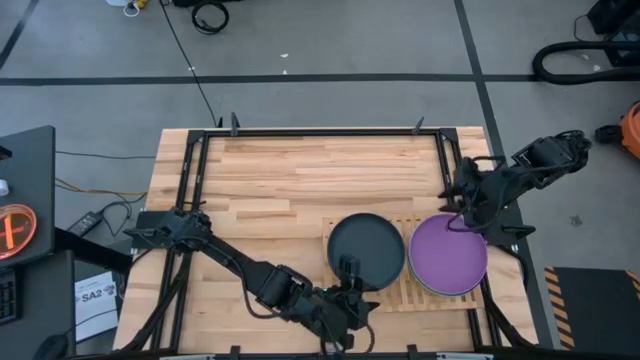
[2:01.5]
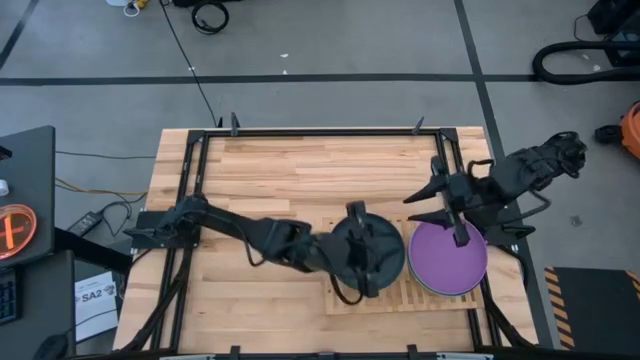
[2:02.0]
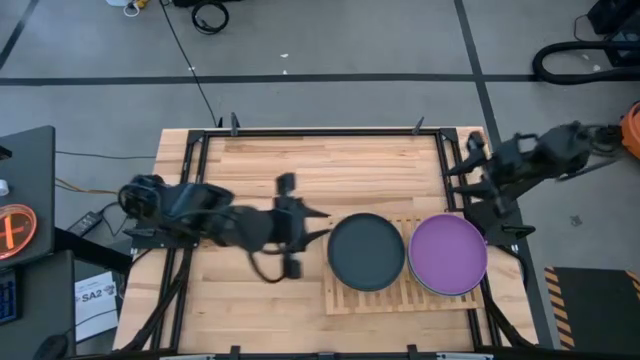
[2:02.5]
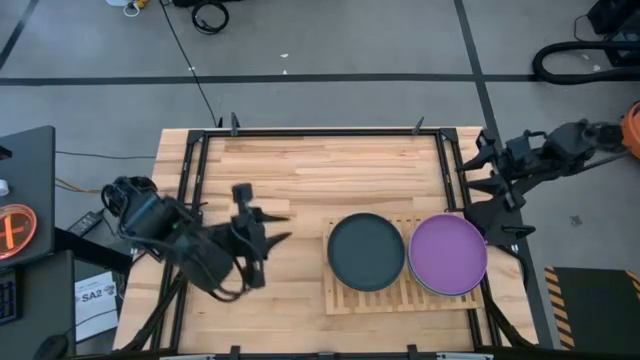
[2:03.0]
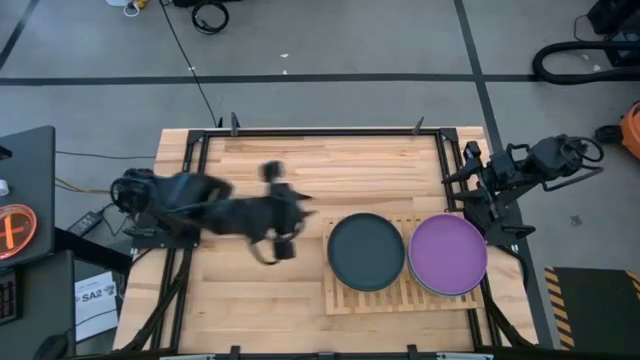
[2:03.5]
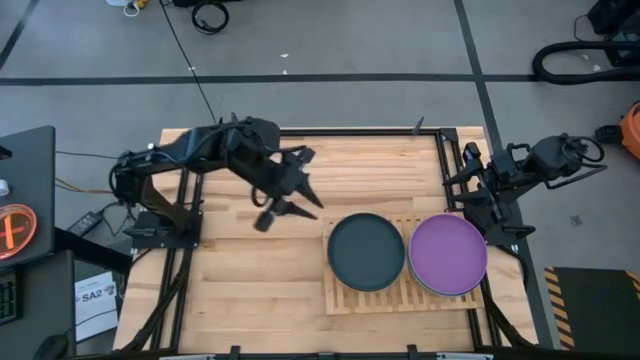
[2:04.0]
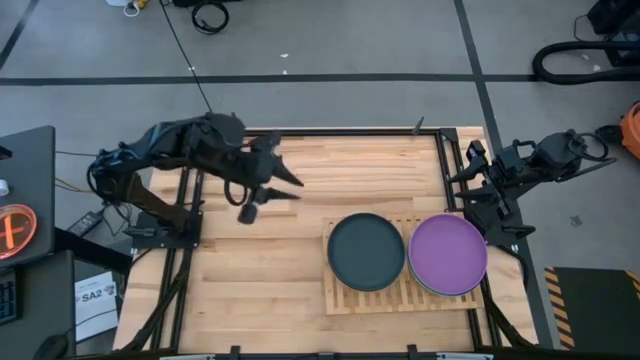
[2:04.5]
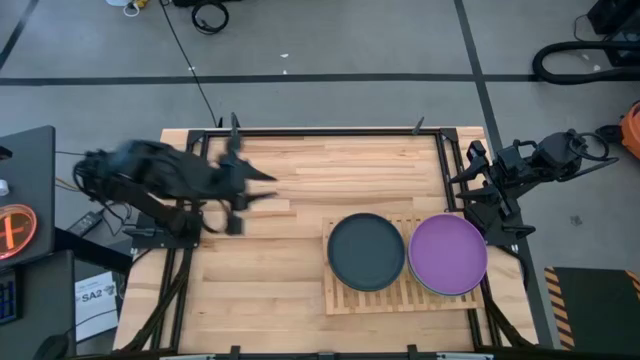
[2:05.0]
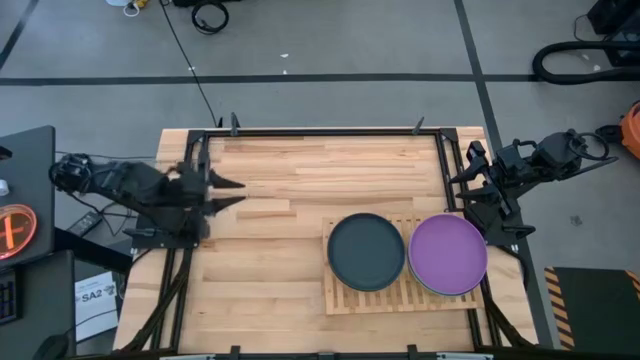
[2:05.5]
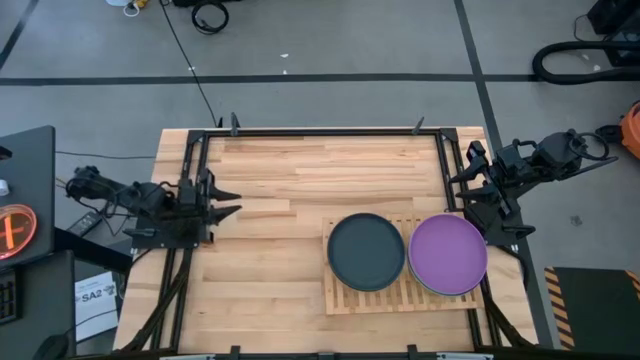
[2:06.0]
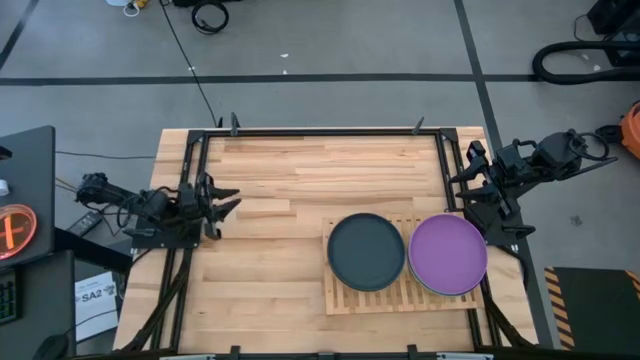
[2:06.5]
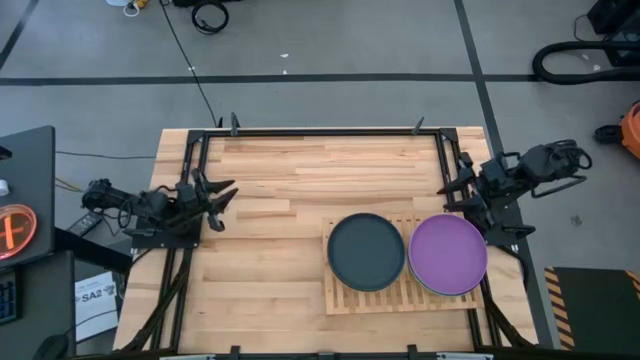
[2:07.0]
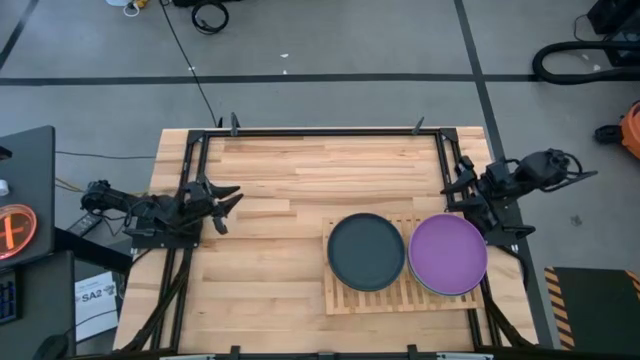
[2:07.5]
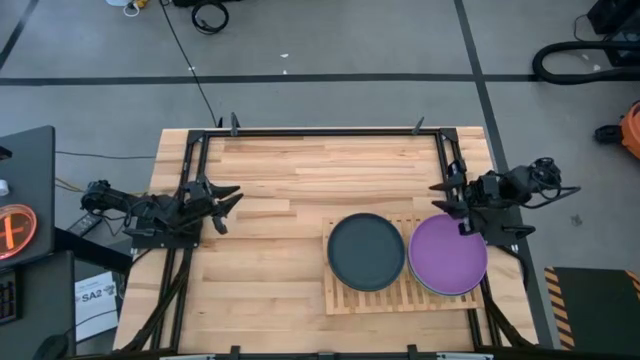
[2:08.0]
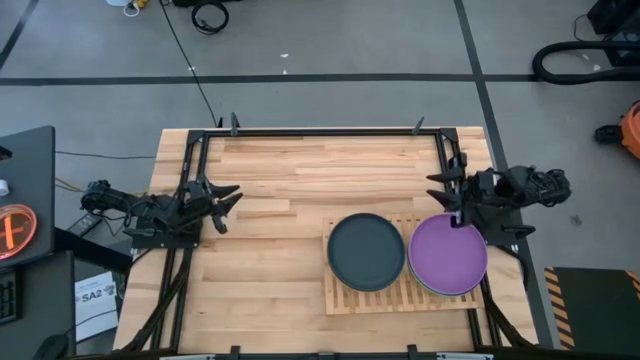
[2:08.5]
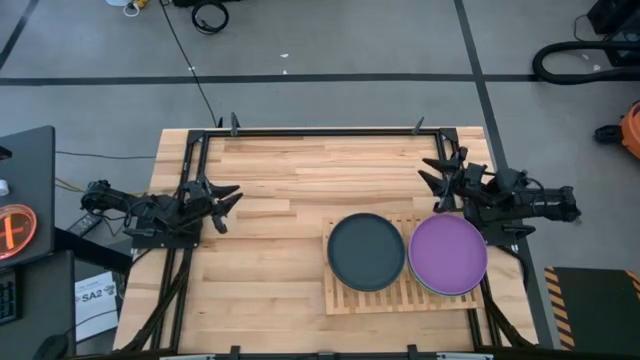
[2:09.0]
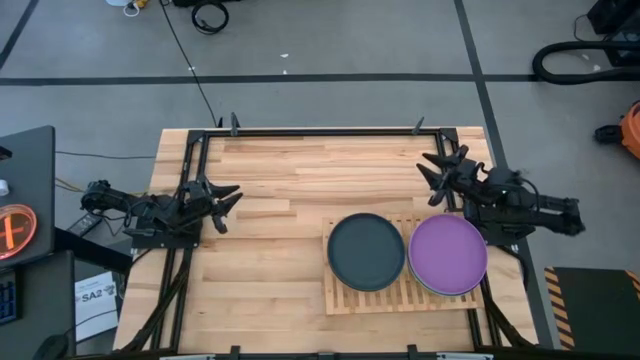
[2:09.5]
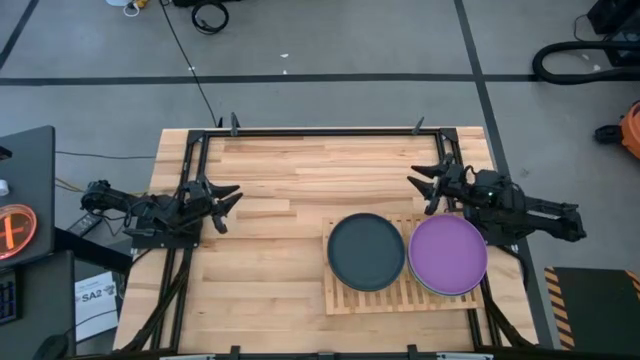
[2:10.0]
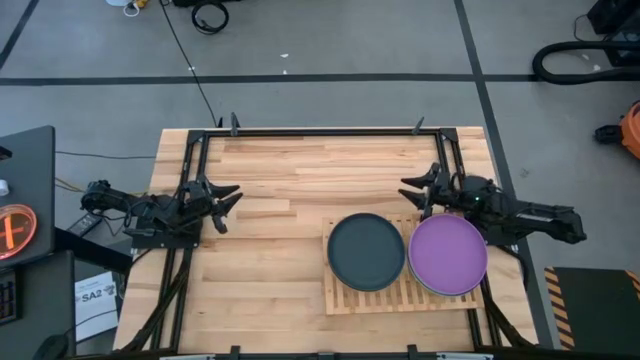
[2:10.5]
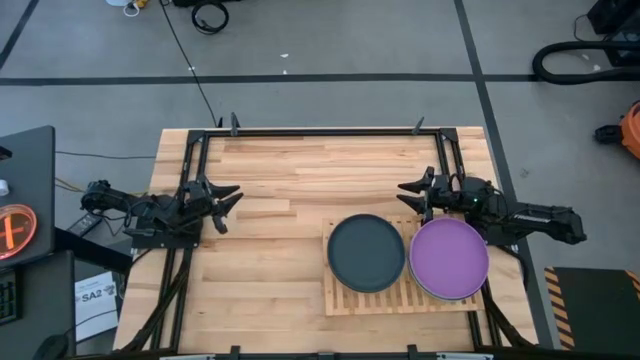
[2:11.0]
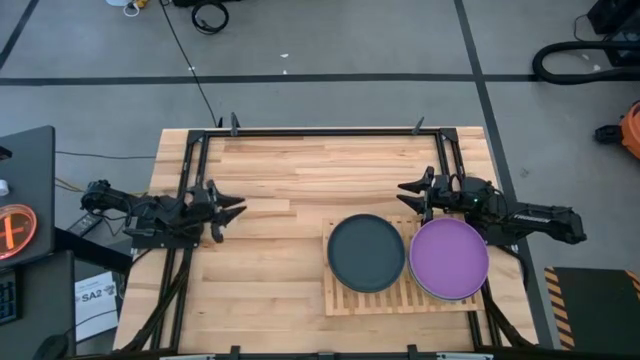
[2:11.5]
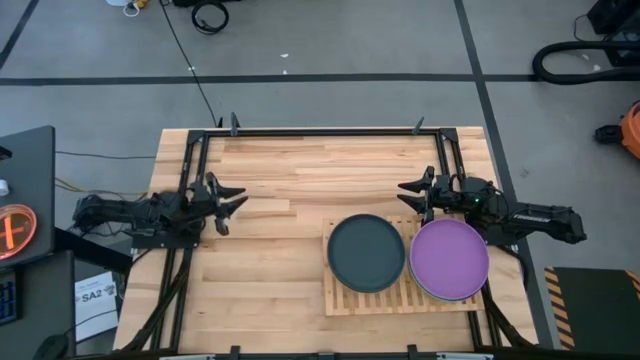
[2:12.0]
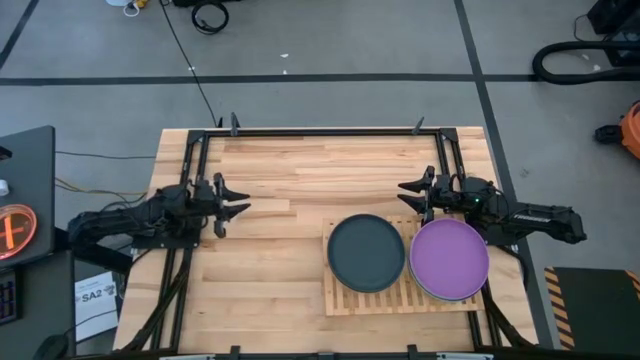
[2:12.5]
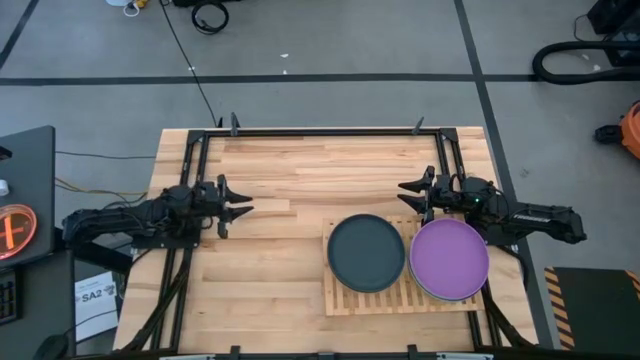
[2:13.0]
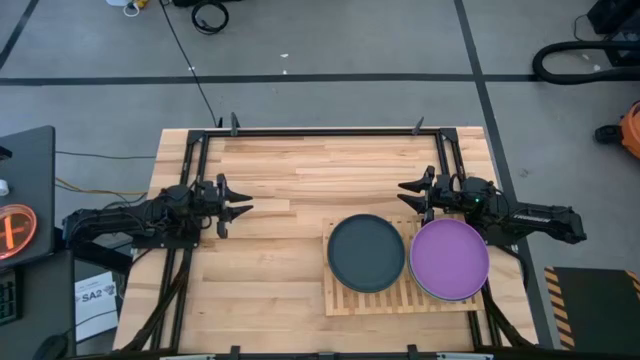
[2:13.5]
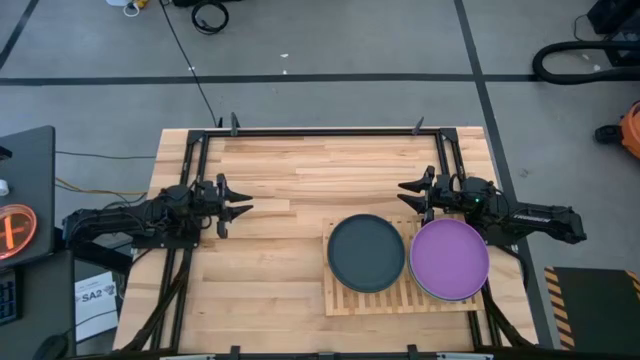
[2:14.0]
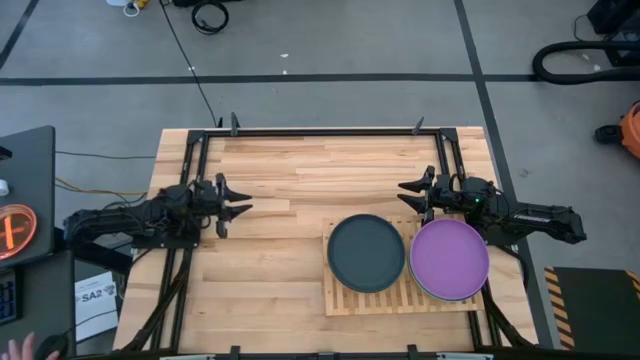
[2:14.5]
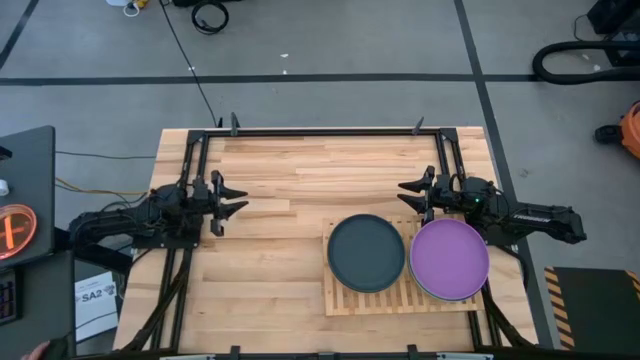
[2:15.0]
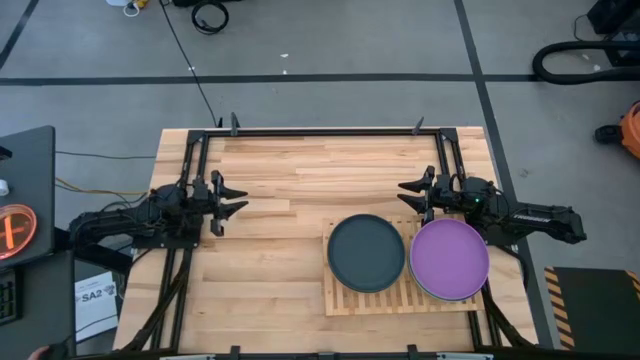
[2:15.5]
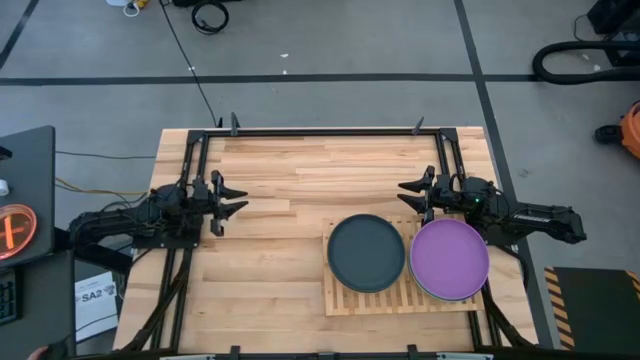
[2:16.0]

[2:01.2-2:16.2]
Task: Place and stack plates onto a shelf
Return to Home Position

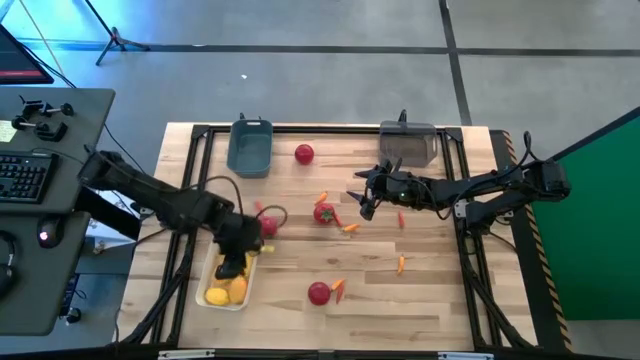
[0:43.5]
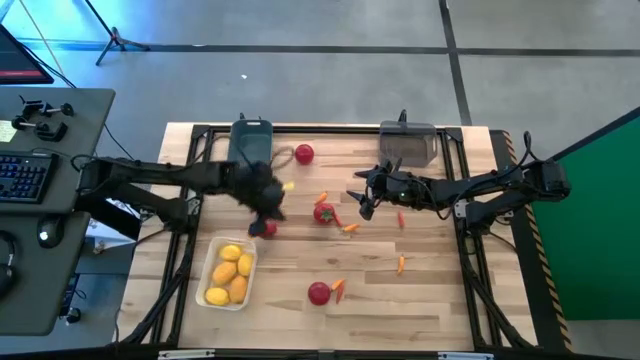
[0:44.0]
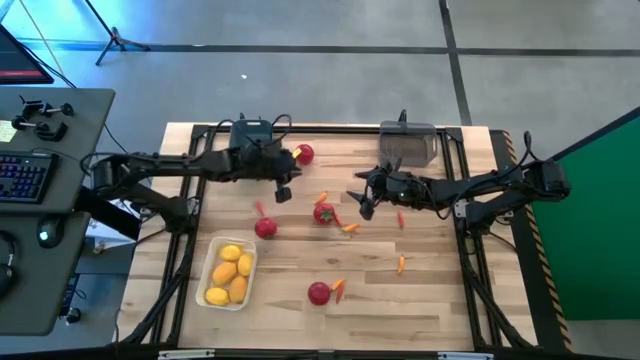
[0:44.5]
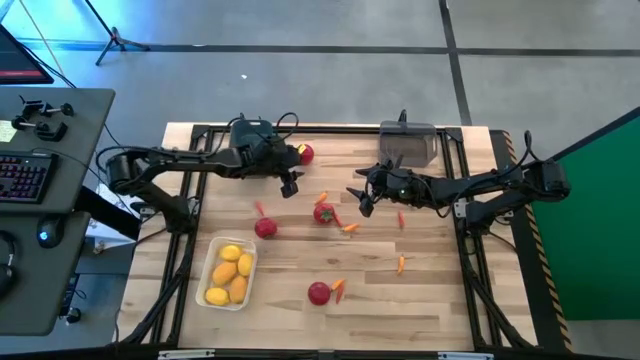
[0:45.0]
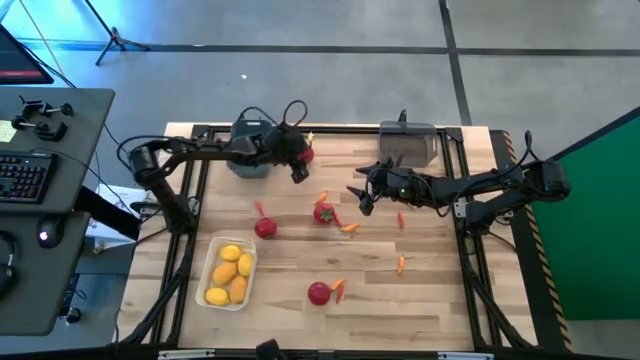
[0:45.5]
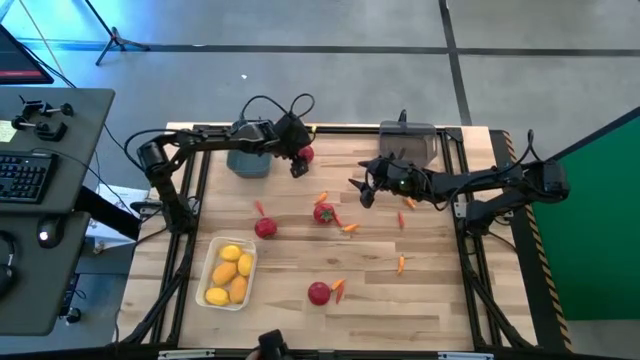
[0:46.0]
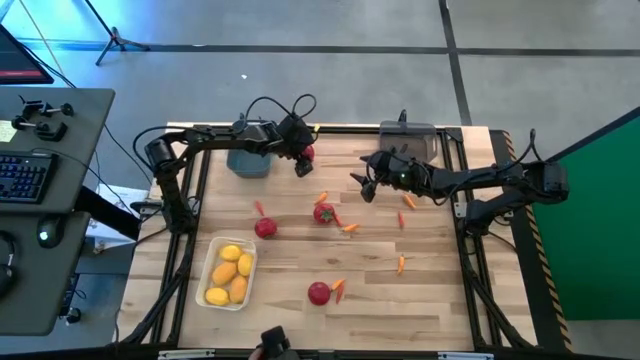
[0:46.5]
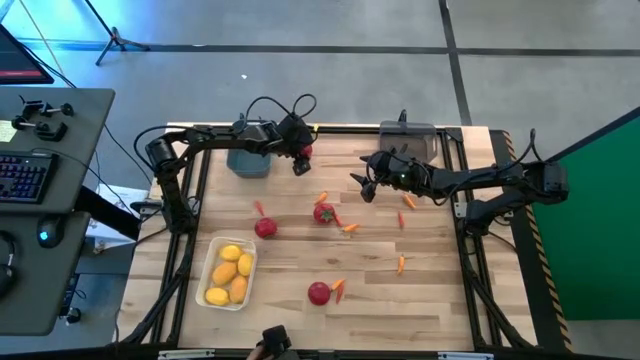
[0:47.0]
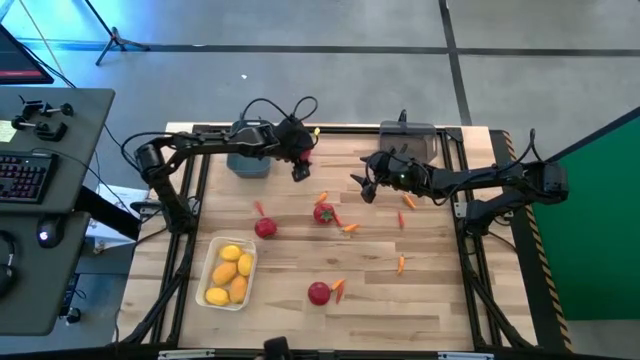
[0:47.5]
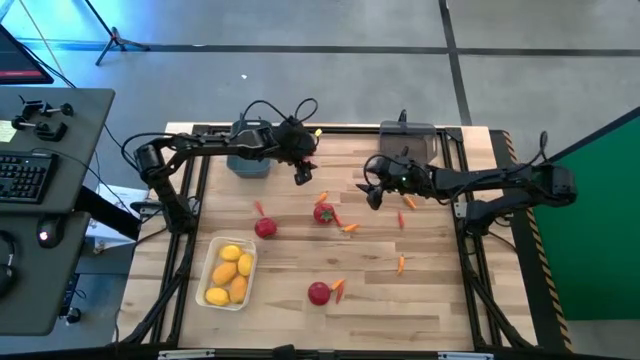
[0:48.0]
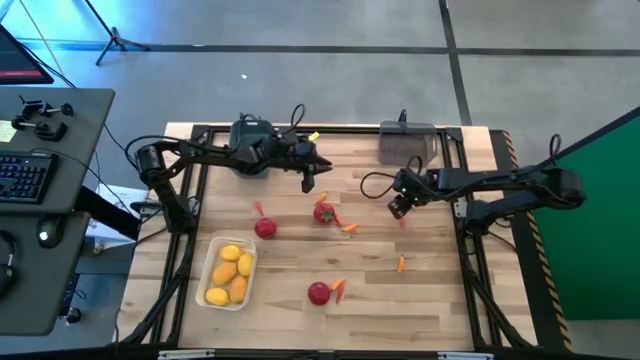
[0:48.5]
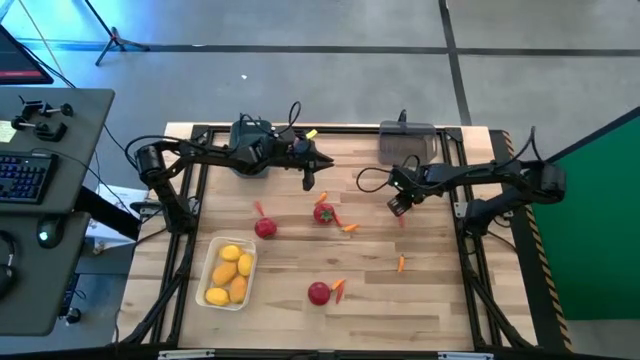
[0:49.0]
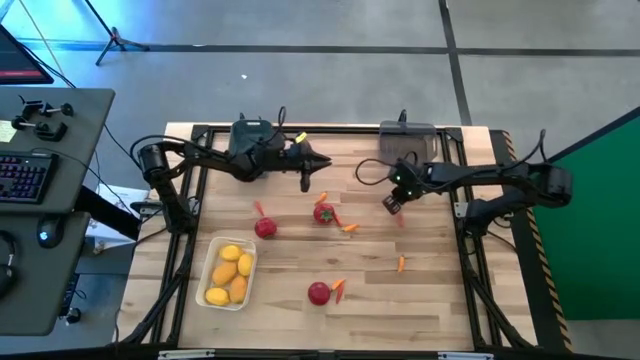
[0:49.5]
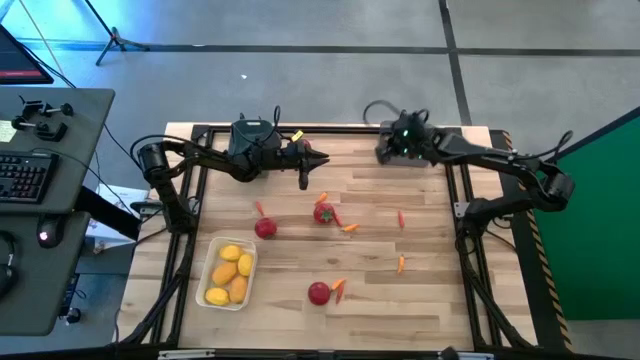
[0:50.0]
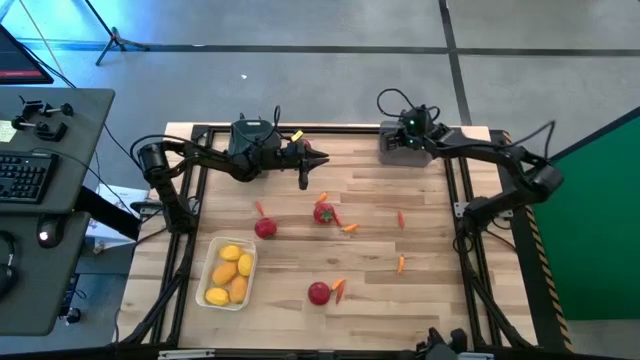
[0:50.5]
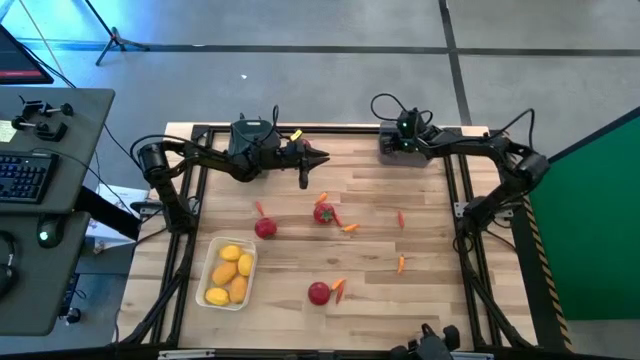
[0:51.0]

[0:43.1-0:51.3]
Task: Sort produce into baskets
Put the orange chili pepper into the black bin
